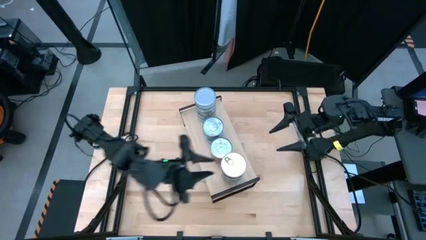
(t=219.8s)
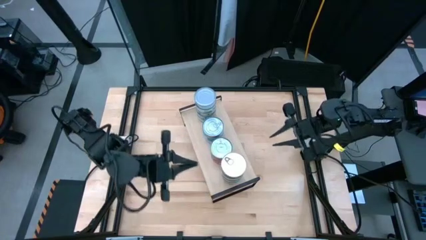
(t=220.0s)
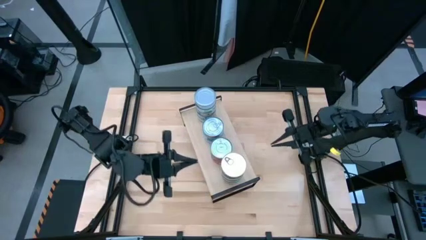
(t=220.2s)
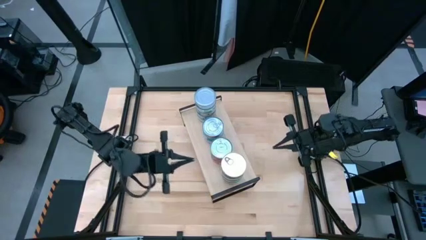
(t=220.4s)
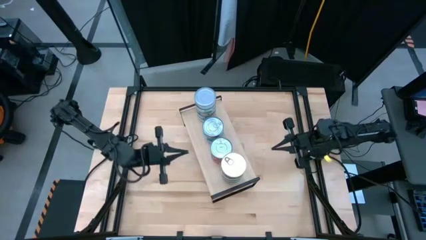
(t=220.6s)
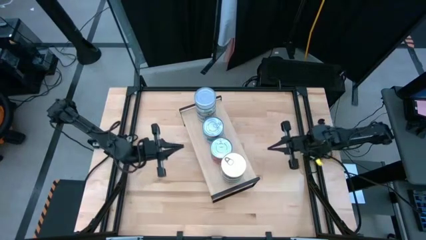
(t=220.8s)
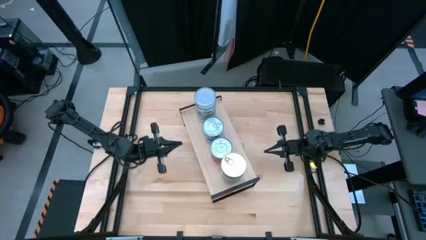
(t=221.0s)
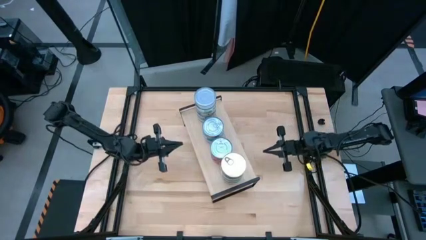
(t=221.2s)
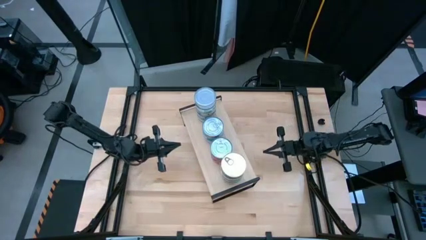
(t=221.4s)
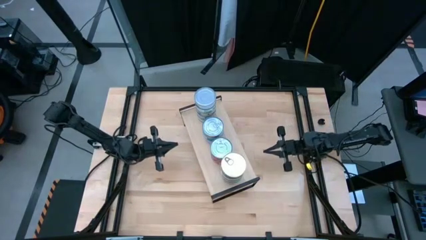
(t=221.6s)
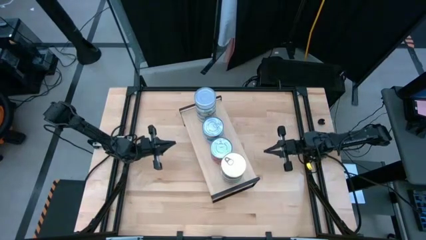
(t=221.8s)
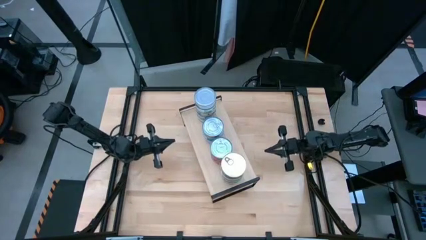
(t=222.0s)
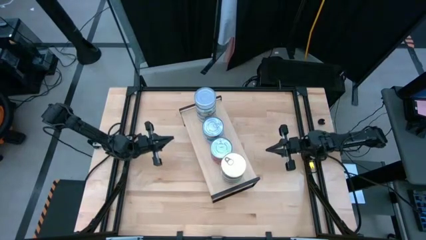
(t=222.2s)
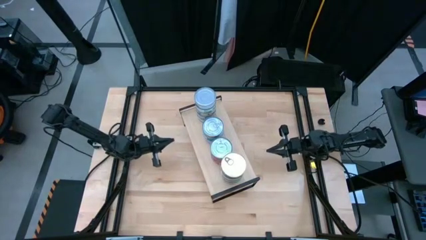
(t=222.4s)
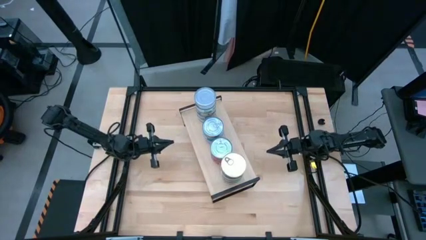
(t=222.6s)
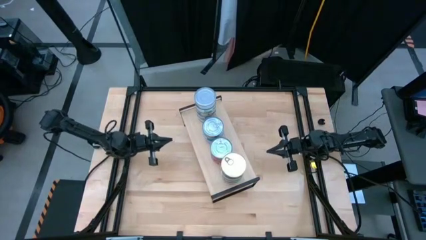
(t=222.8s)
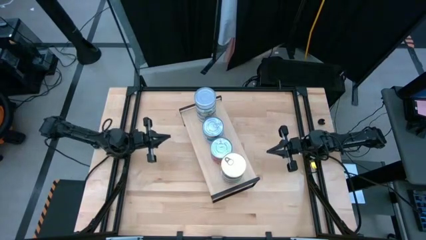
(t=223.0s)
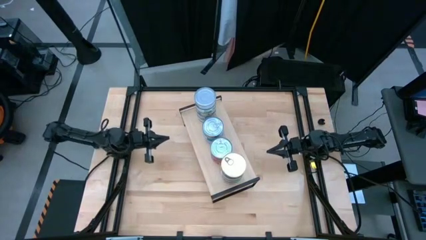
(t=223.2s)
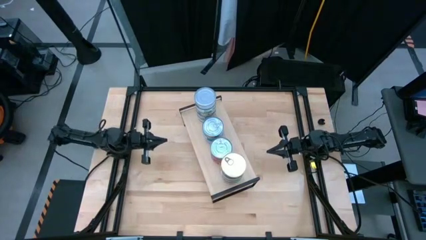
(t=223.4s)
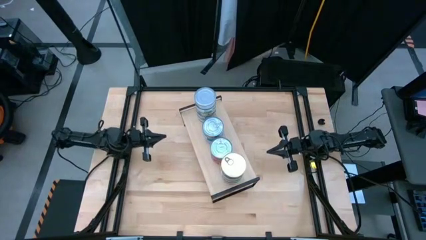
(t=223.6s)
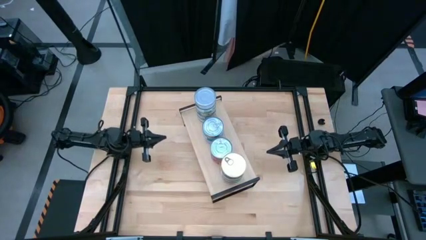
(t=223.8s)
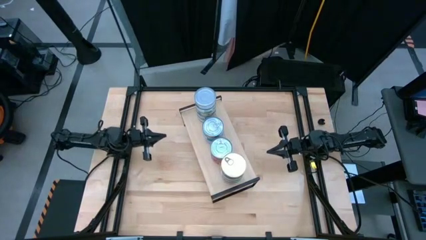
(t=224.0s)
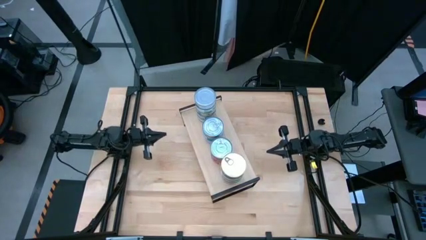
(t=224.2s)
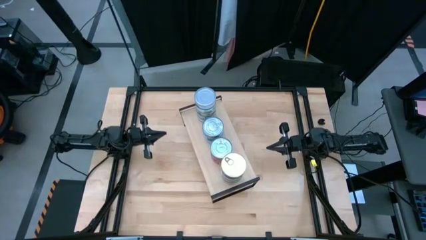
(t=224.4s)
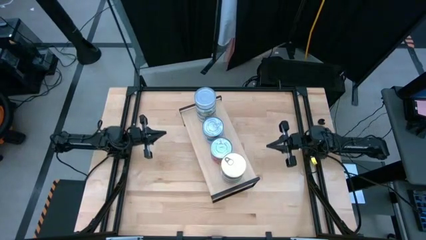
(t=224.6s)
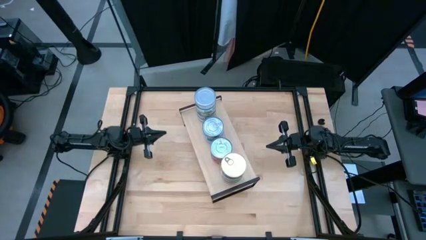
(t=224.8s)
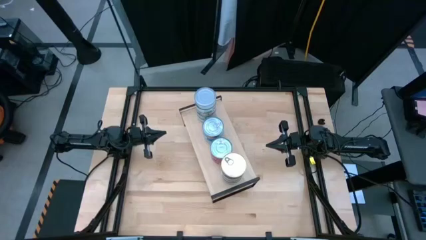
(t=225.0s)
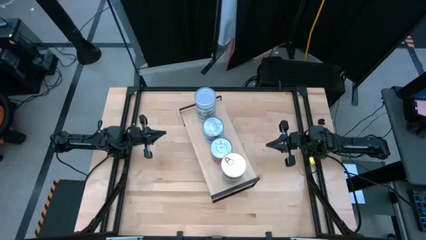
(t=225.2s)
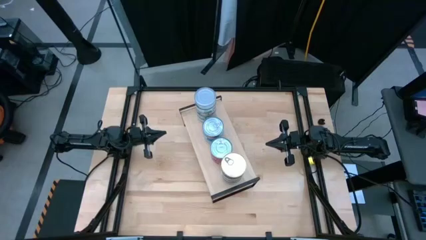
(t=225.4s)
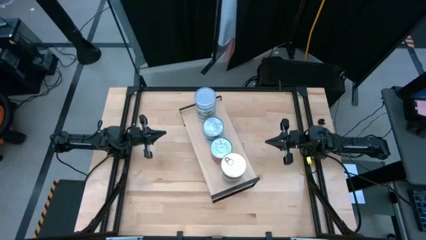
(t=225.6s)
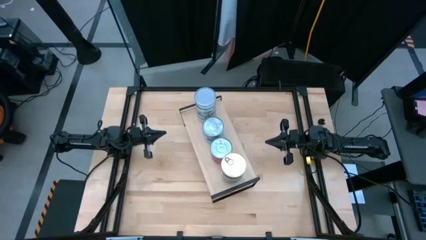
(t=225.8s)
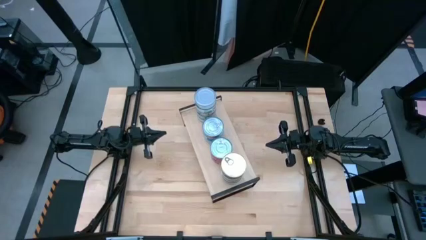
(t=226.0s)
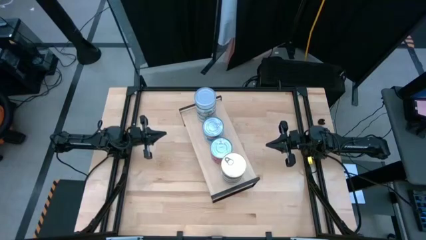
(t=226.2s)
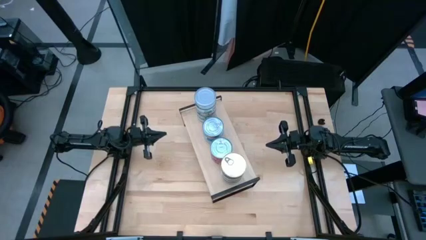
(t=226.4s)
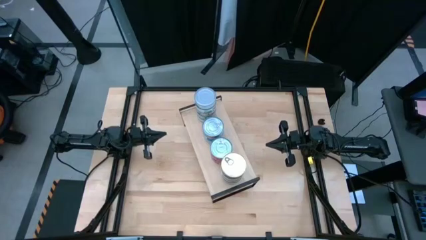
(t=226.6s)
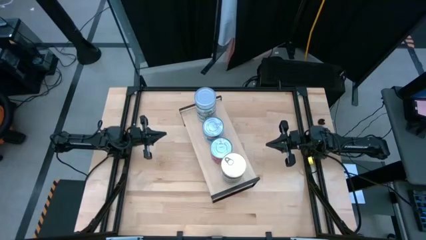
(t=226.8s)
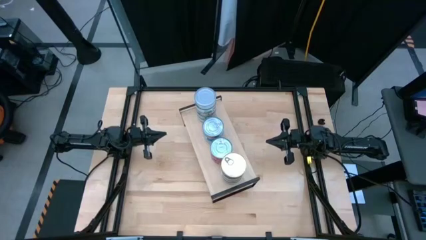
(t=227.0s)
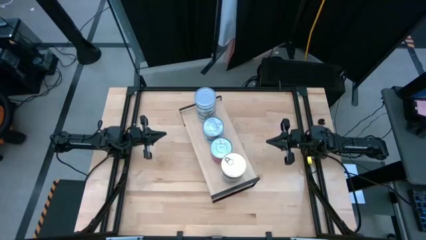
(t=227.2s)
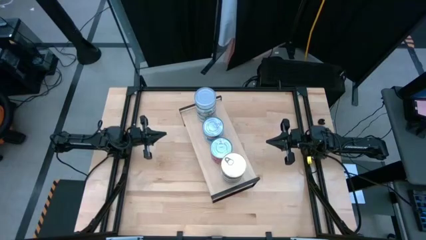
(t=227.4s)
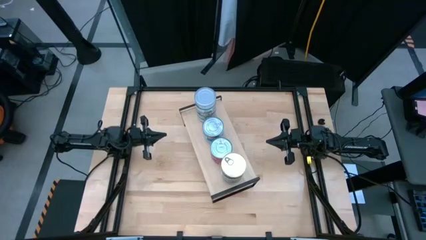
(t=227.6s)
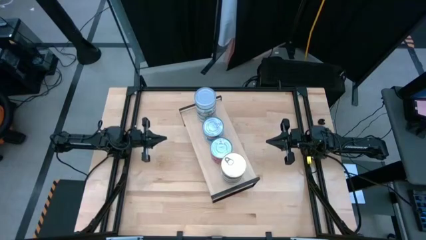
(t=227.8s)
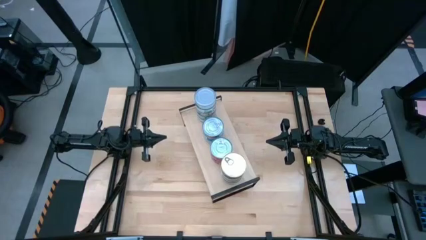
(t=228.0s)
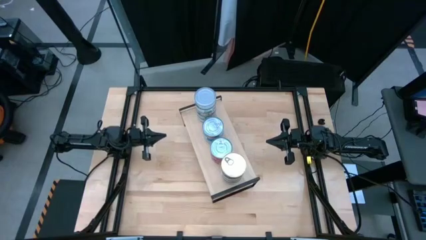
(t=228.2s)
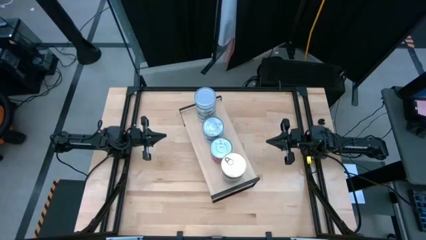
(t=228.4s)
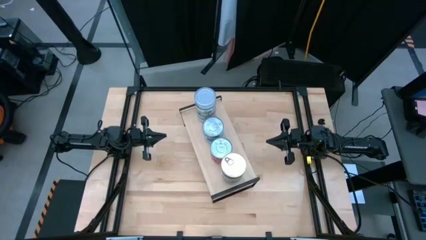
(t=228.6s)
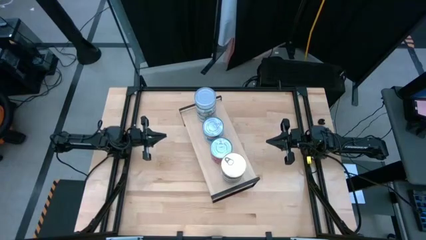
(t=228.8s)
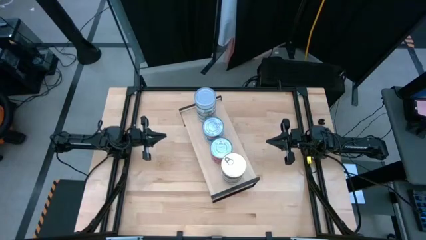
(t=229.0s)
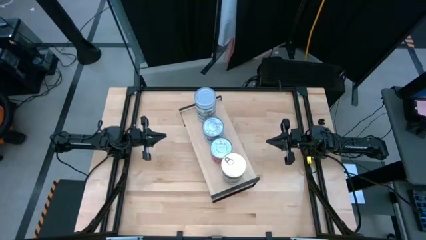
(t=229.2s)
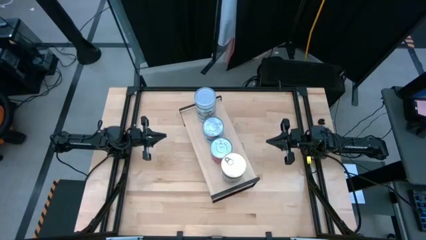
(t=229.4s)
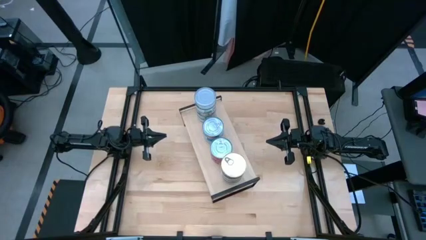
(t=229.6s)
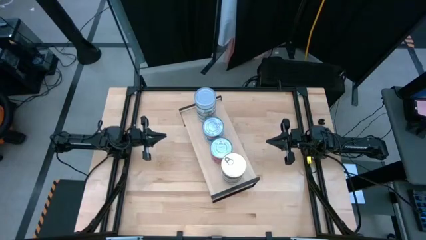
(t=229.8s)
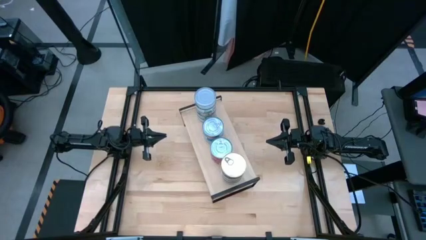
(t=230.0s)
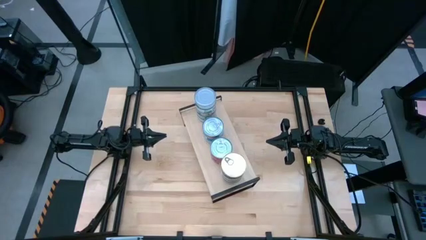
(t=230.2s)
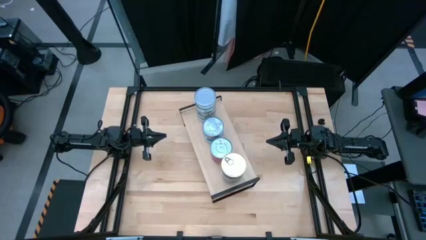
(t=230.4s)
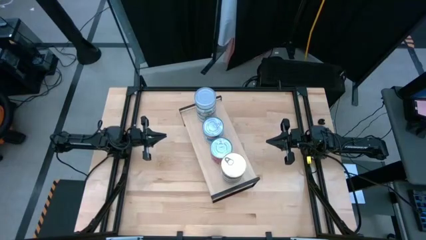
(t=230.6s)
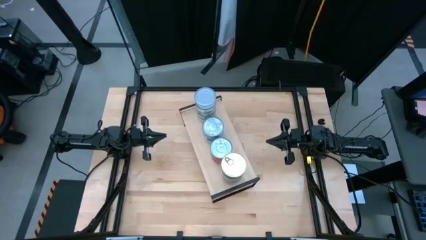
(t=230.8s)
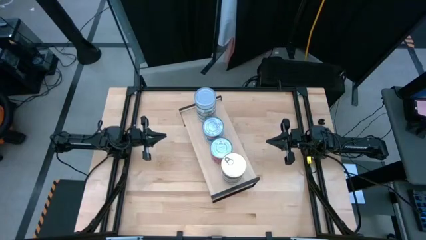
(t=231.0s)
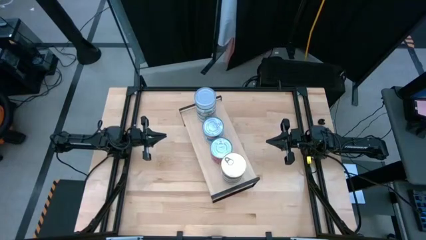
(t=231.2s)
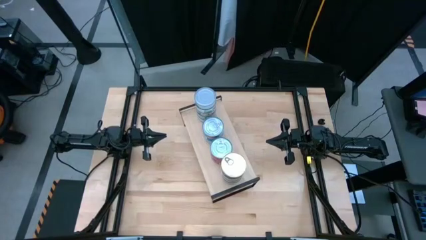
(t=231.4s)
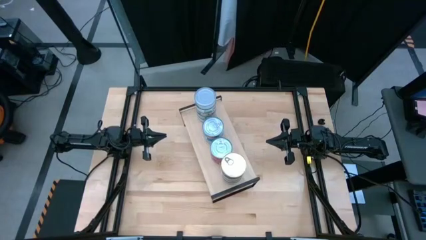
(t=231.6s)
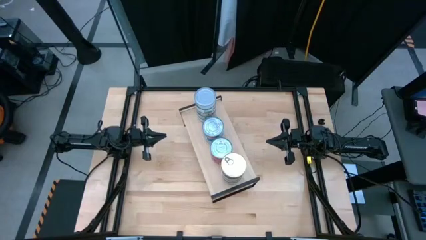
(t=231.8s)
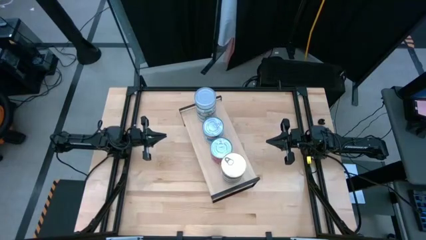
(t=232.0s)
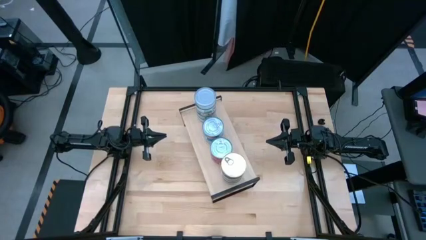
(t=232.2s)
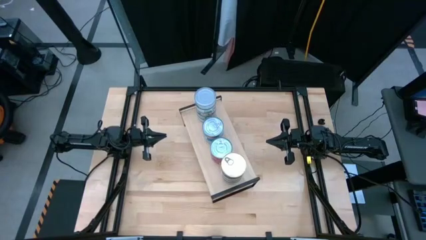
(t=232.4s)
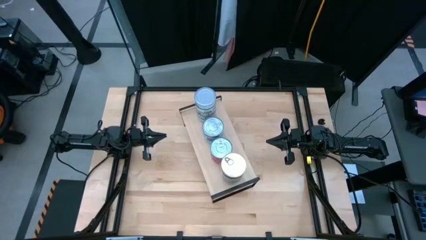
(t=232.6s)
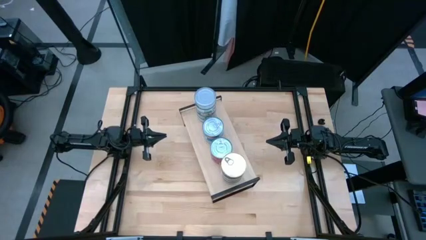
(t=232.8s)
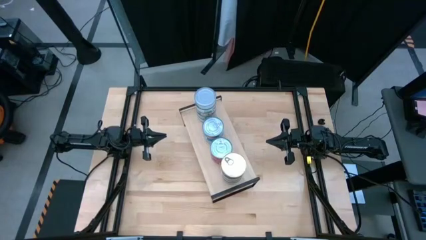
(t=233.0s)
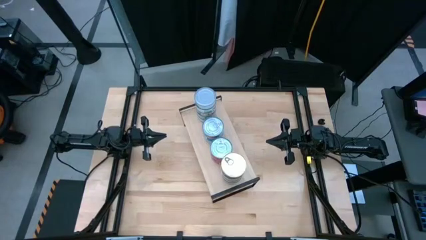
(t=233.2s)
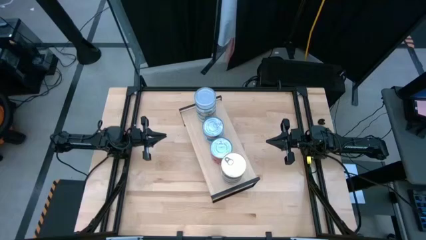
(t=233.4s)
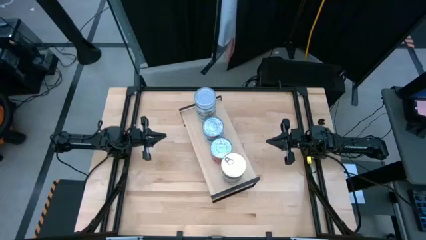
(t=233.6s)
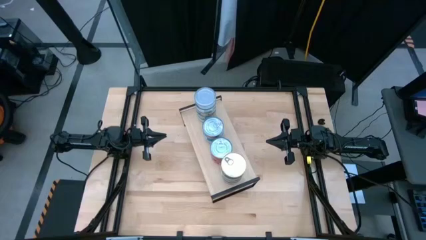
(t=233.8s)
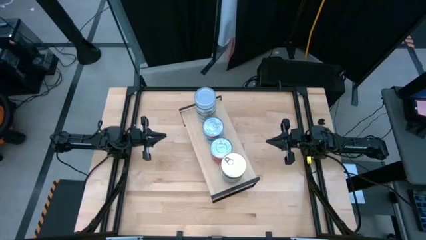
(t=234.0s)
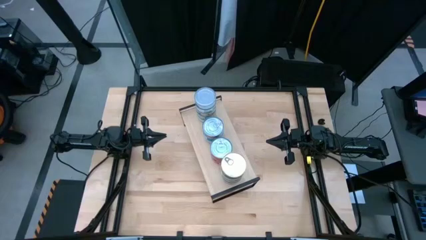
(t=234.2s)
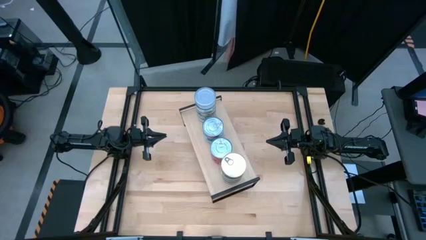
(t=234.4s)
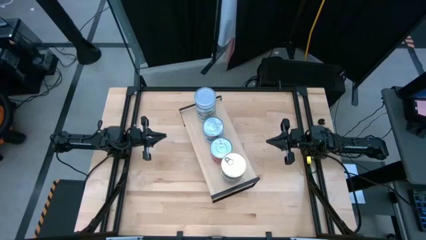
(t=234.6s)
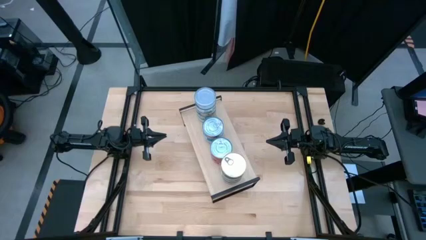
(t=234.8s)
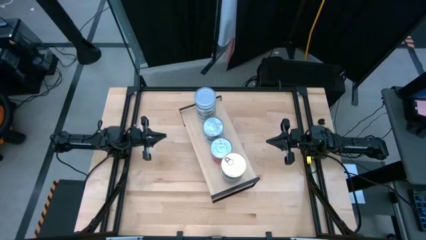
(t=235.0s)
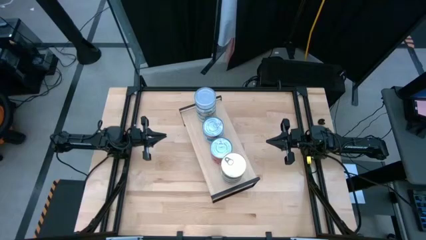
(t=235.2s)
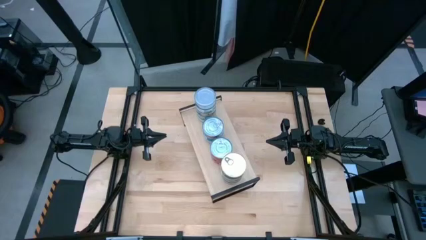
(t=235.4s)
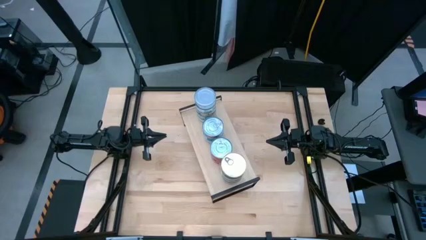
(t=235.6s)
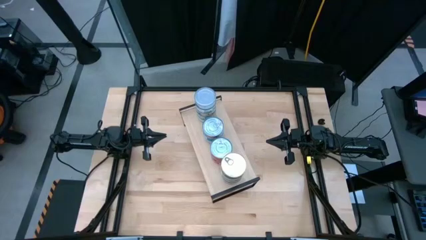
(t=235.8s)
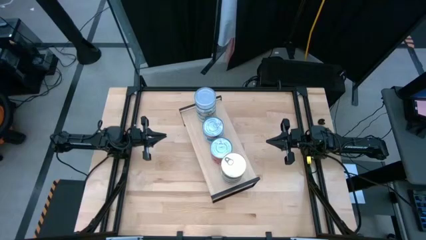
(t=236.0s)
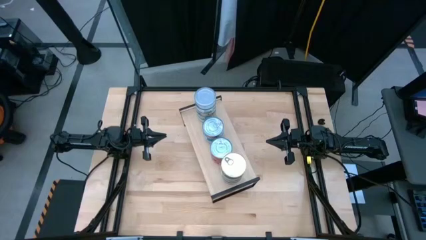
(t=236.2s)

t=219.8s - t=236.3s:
Task: Stack canned seafood by type on shelf
Return to home position
